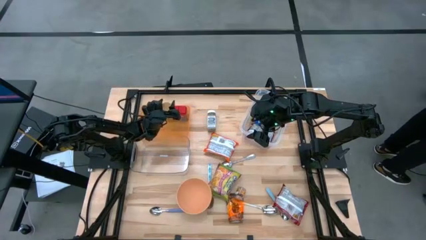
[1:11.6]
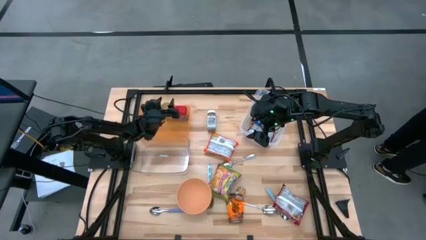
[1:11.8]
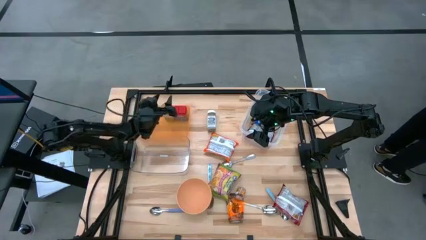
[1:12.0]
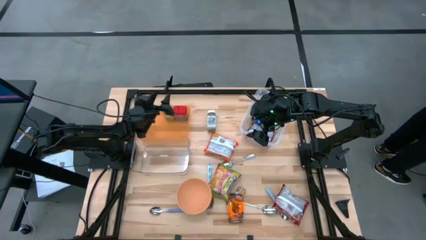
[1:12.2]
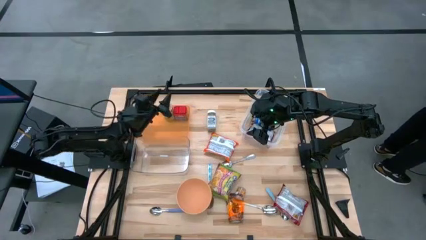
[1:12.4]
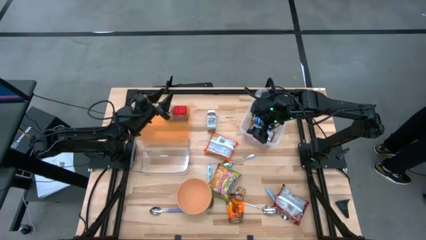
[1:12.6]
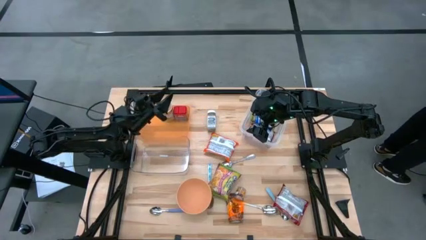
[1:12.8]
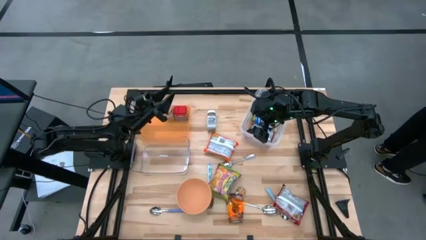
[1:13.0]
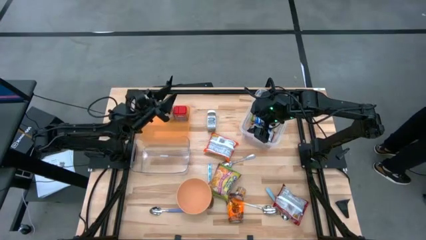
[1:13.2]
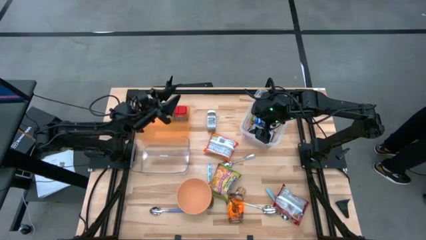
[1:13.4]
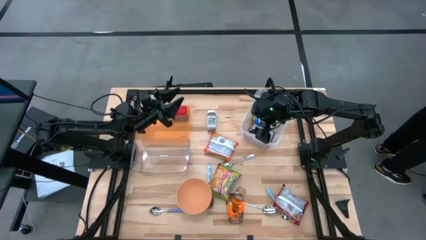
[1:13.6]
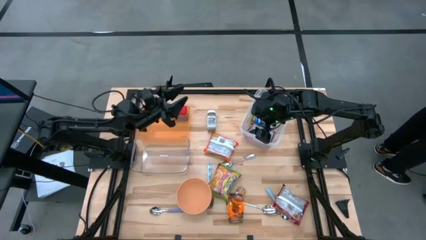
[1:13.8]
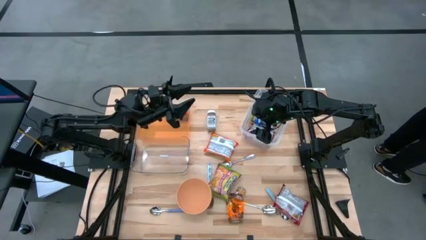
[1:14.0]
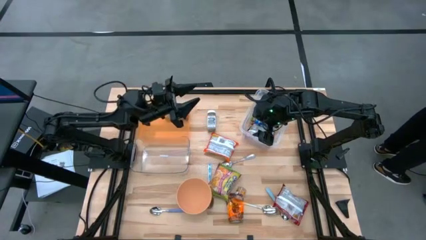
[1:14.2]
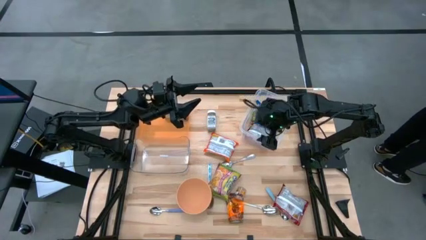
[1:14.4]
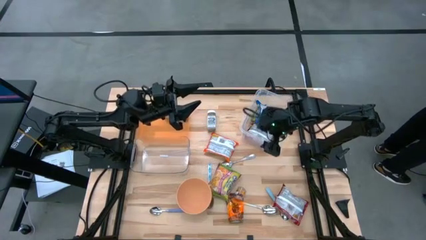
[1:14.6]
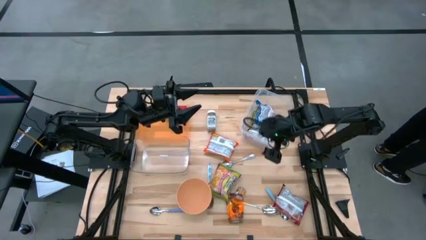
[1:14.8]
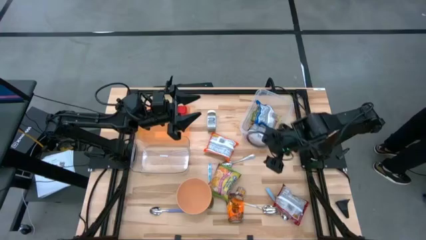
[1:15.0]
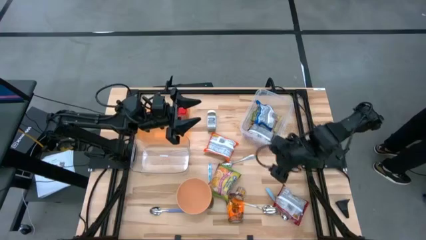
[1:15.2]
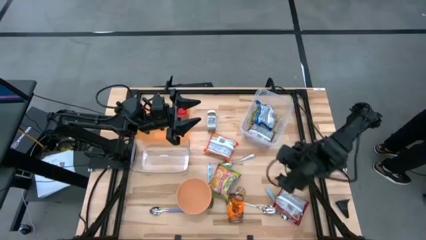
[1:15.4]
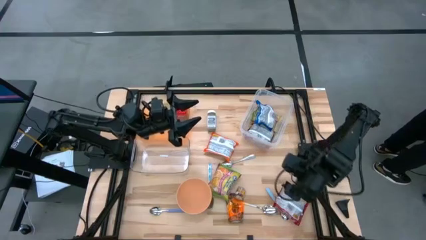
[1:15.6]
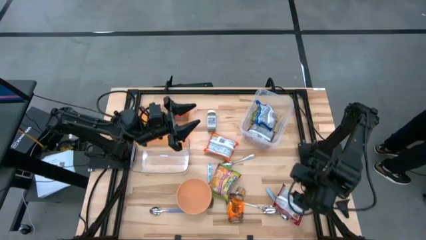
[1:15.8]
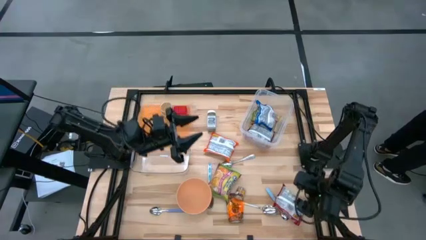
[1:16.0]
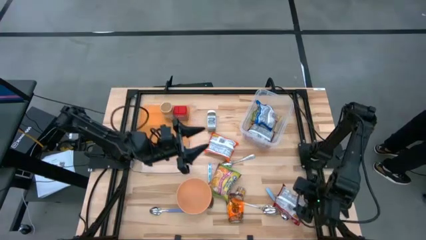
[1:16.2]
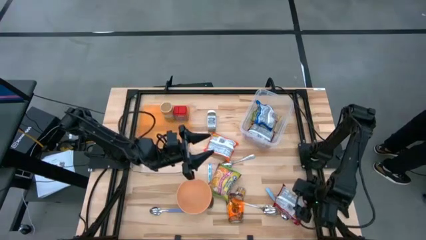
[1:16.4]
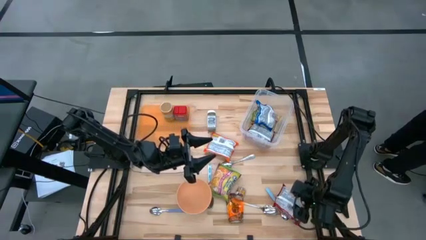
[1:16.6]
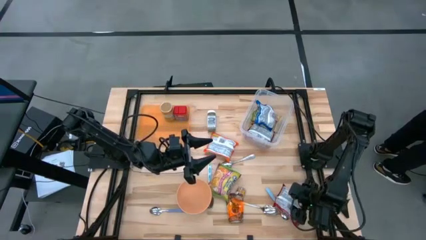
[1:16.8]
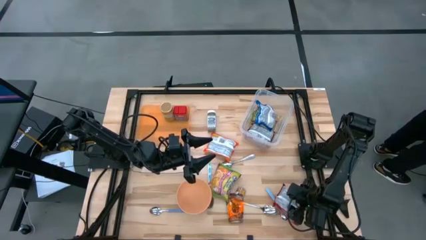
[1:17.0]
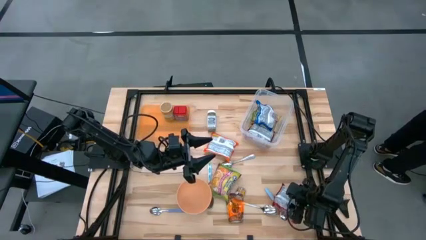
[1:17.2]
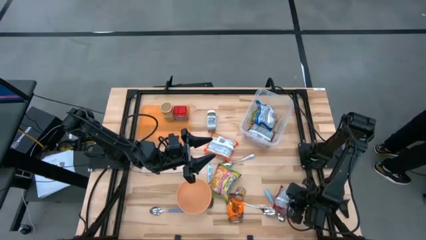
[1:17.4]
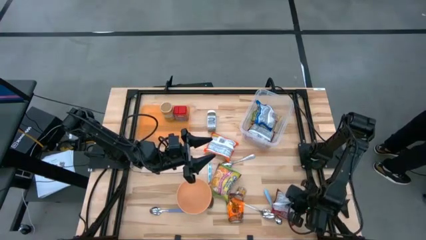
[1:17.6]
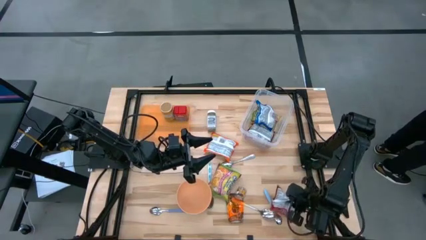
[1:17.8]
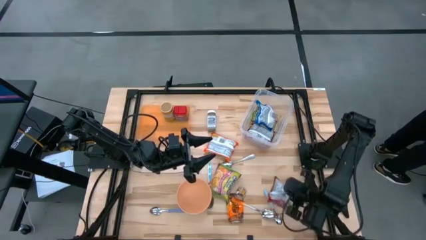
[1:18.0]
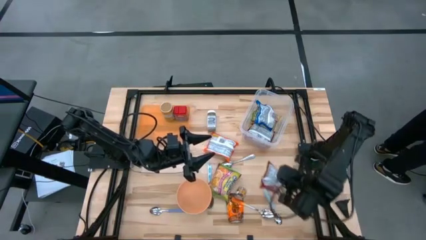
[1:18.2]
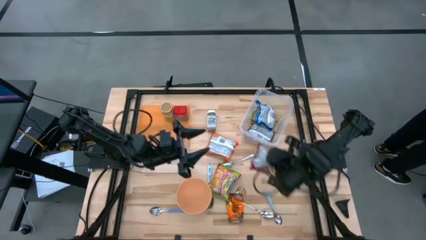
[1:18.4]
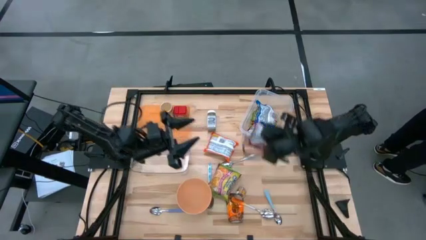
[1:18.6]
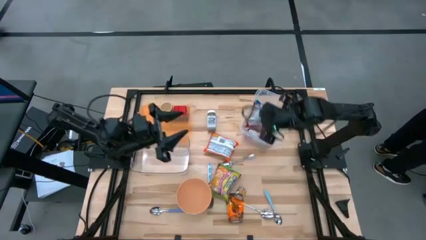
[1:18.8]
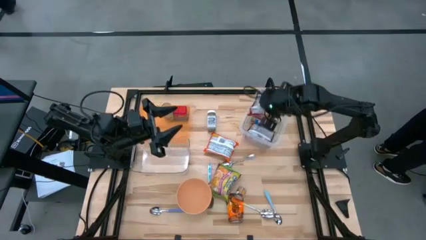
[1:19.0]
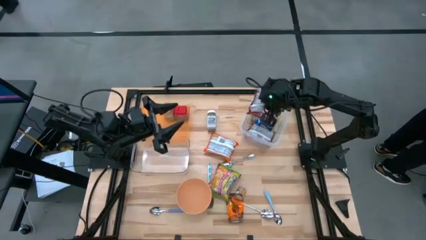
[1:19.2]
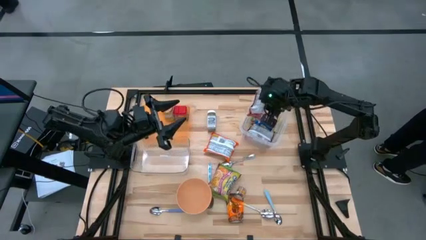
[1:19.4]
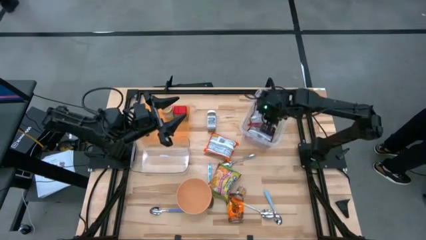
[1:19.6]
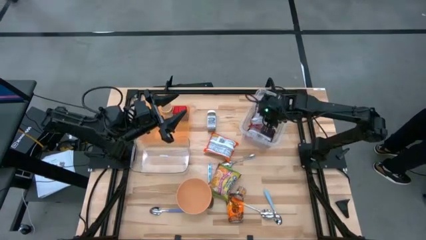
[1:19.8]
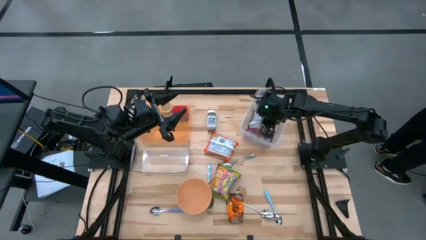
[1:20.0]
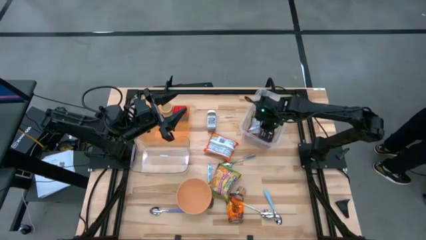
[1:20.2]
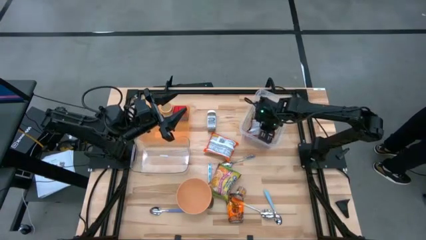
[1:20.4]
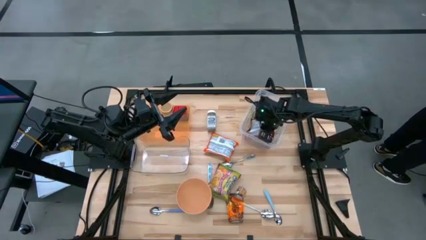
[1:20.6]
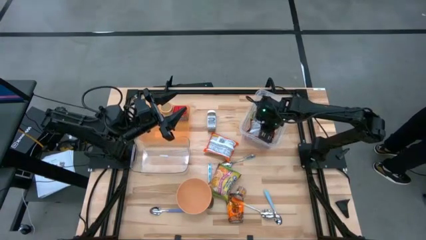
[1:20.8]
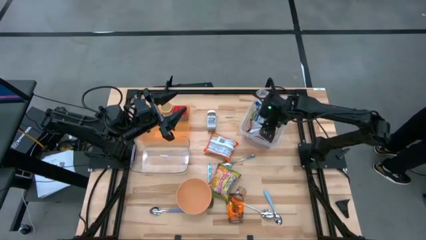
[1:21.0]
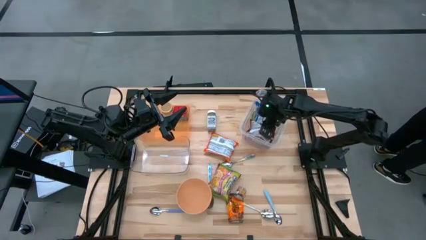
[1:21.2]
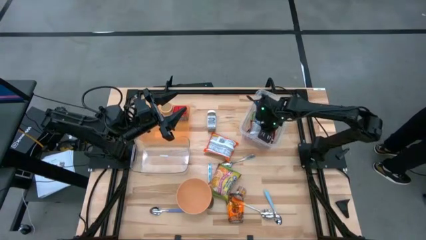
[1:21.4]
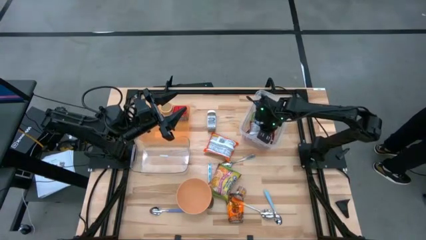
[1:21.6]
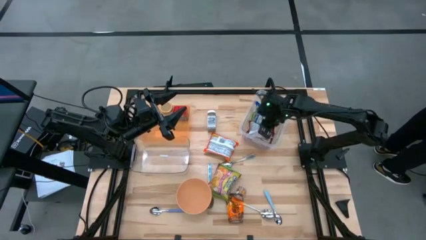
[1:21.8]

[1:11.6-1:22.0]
Task: Pick & Place Food Item
Put the red noodle pack into the top transparent bin

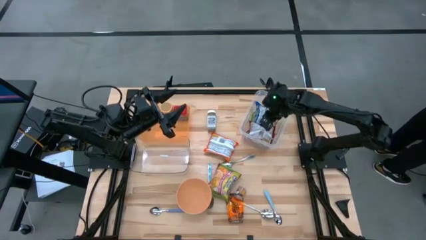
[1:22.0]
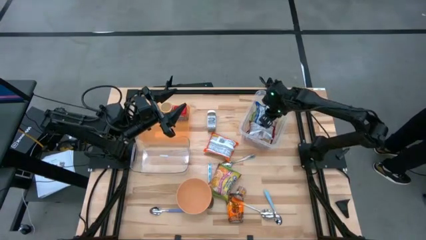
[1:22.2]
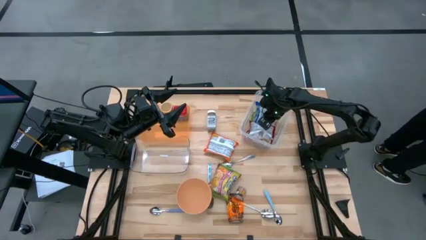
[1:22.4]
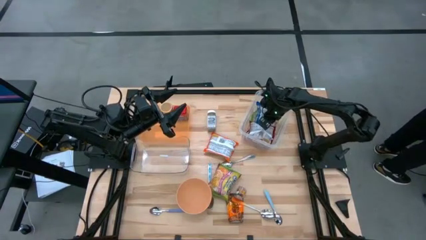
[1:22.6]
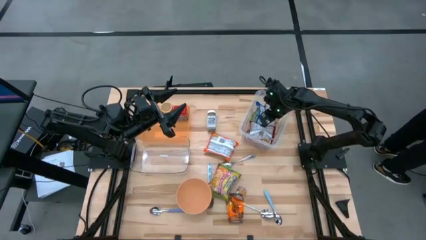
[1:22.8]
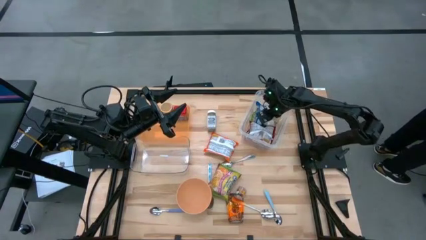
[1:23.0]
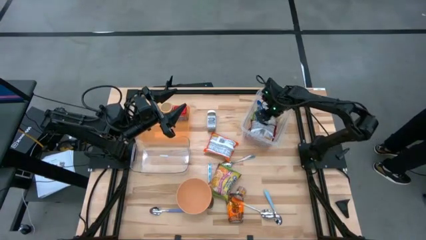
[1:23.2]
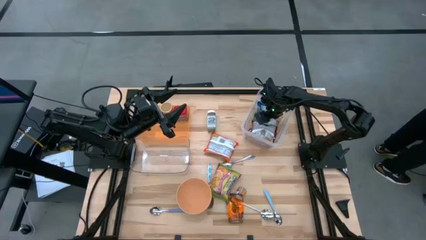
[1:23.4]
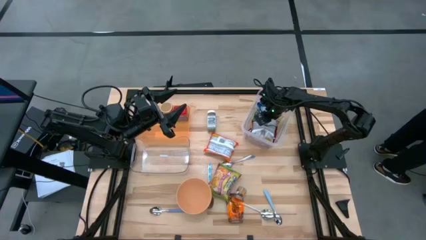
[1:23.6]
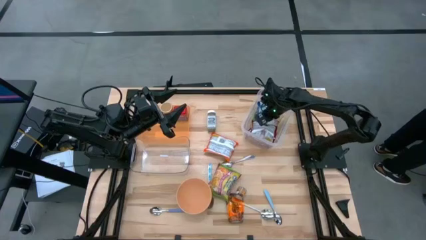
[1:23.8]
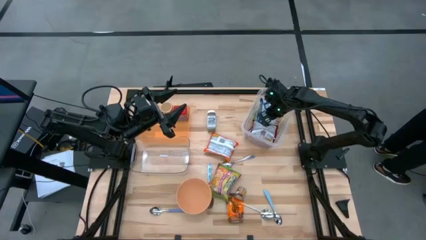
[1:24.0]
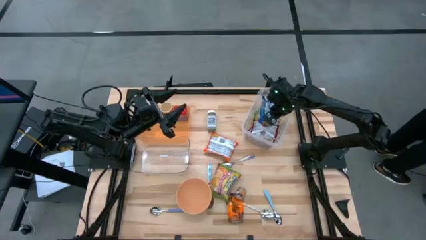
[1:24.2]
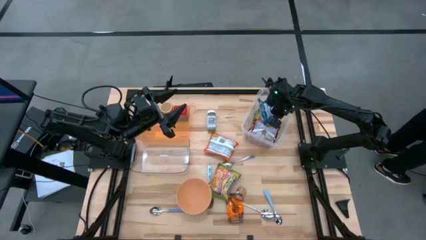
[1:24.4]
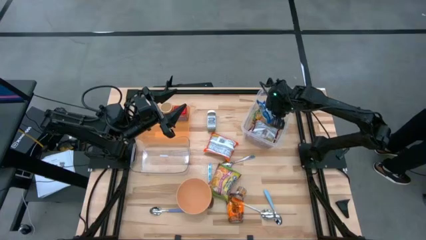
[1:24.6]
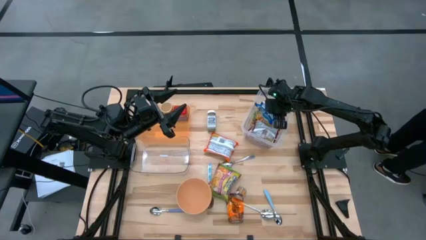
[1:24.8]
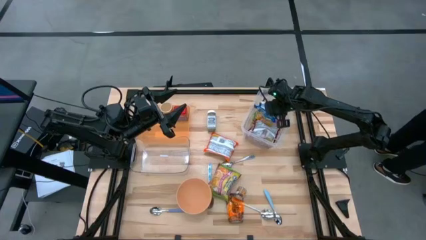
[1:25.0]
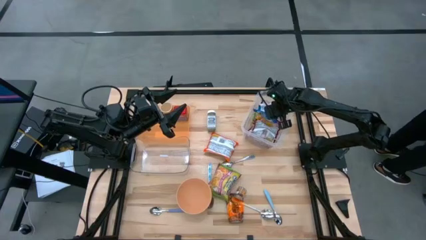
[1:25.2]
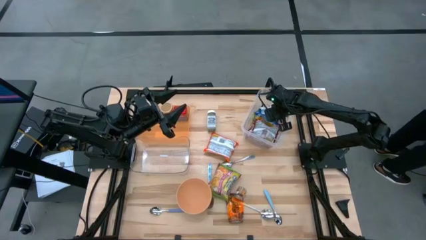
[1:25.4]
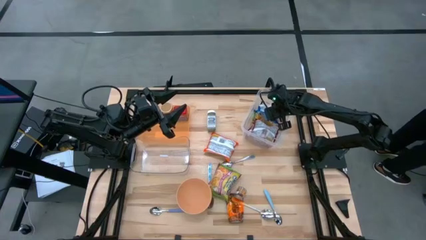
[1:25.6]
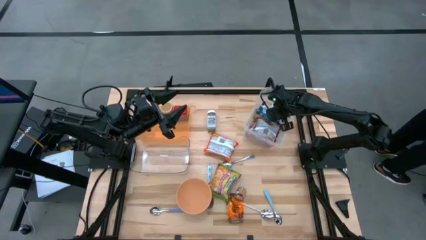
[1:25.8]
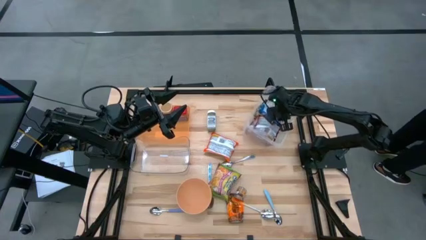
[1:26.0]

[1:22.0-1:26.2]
Adjust the blue noodle pack in the top transparent bin
